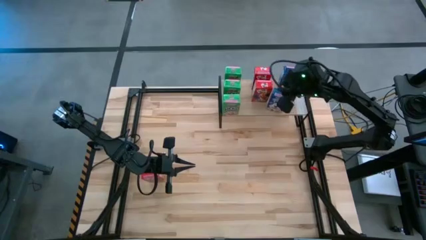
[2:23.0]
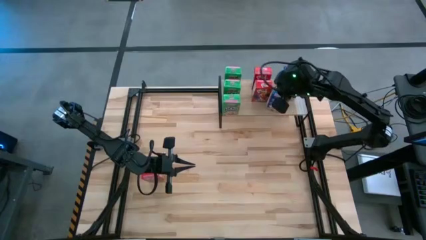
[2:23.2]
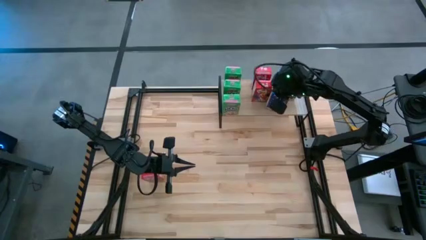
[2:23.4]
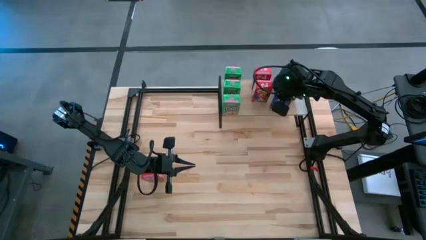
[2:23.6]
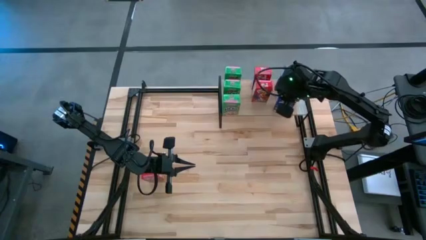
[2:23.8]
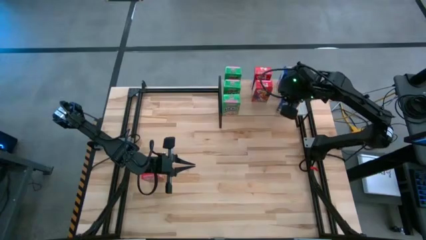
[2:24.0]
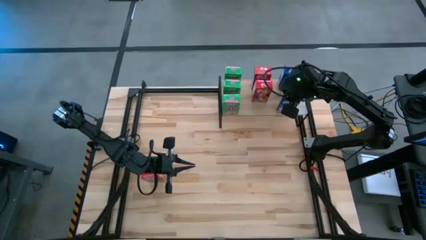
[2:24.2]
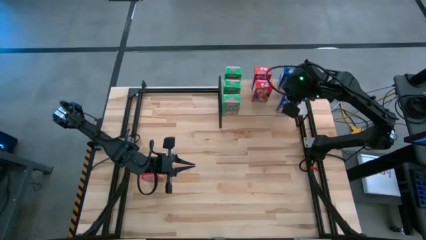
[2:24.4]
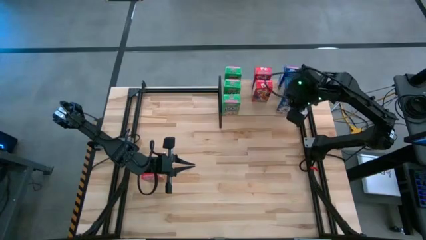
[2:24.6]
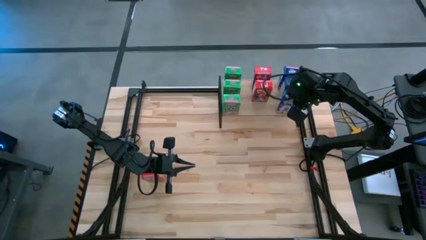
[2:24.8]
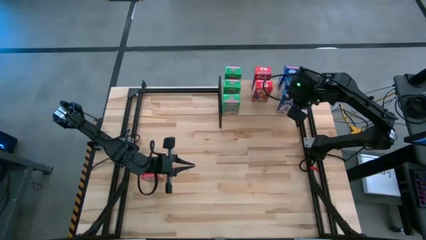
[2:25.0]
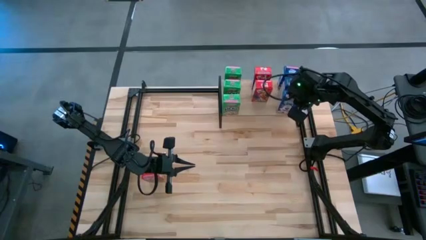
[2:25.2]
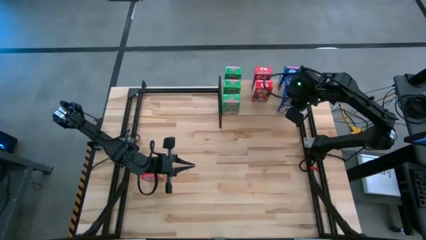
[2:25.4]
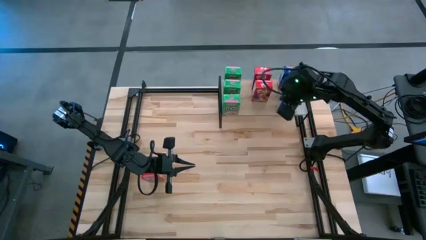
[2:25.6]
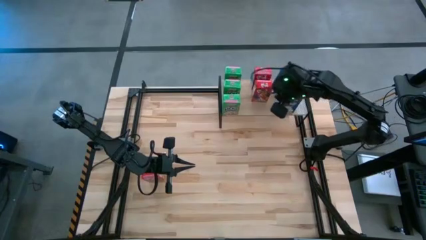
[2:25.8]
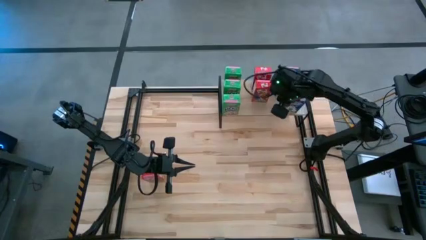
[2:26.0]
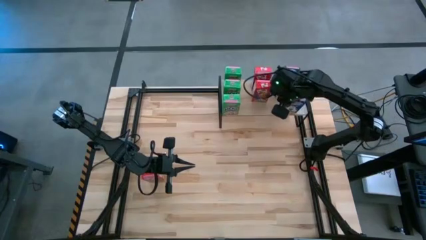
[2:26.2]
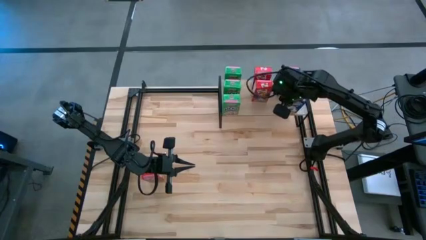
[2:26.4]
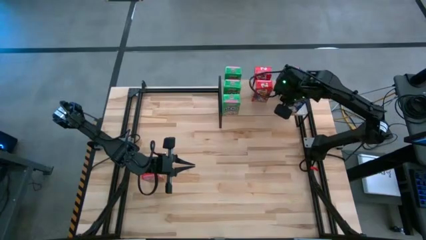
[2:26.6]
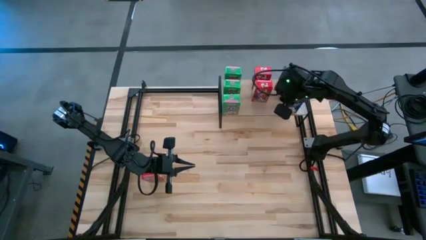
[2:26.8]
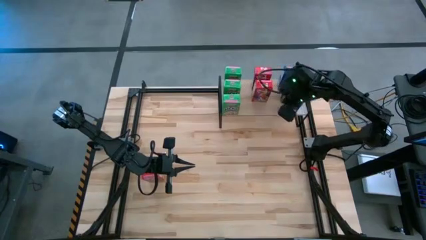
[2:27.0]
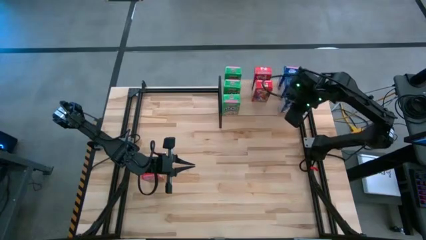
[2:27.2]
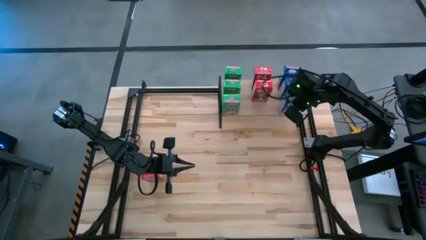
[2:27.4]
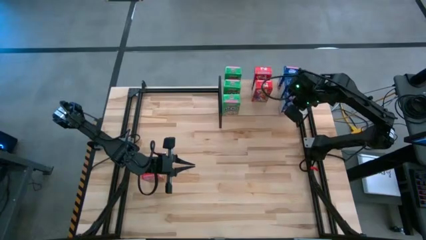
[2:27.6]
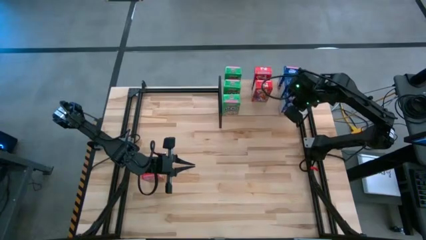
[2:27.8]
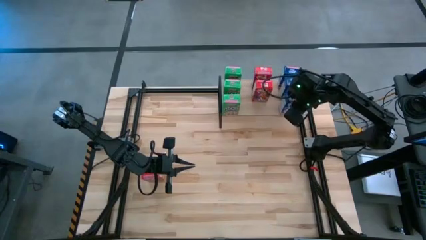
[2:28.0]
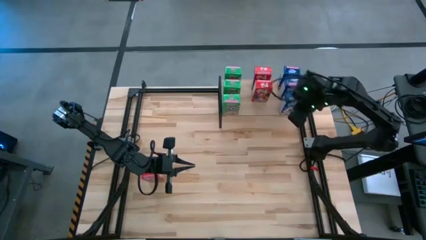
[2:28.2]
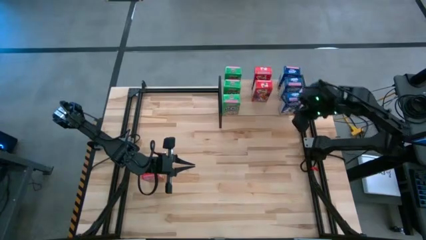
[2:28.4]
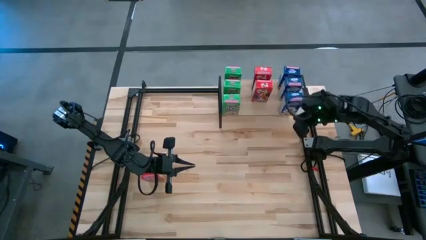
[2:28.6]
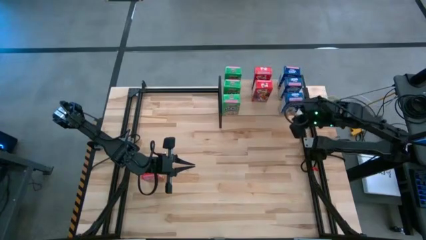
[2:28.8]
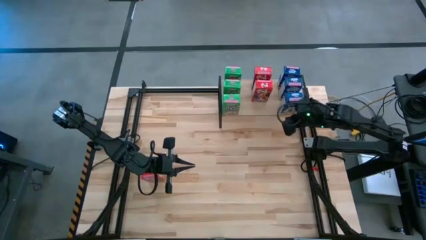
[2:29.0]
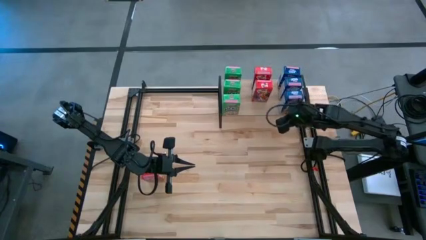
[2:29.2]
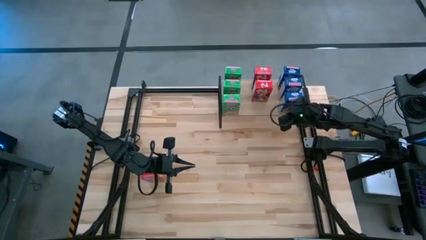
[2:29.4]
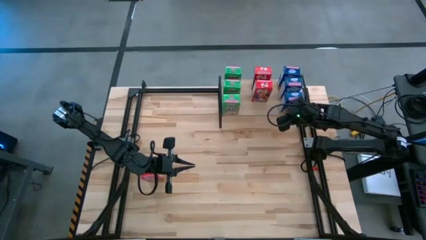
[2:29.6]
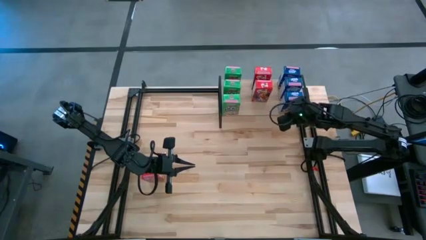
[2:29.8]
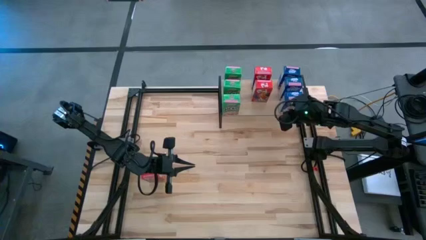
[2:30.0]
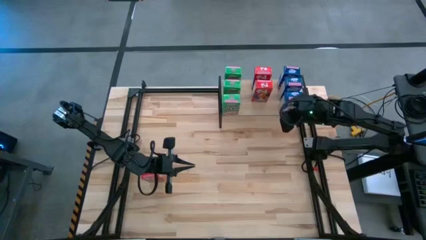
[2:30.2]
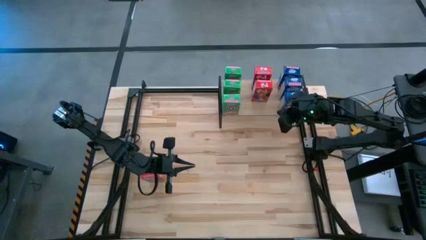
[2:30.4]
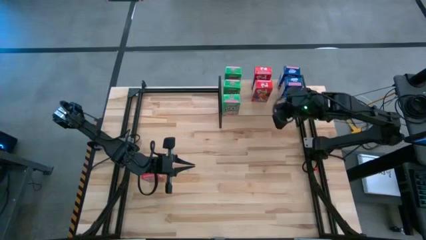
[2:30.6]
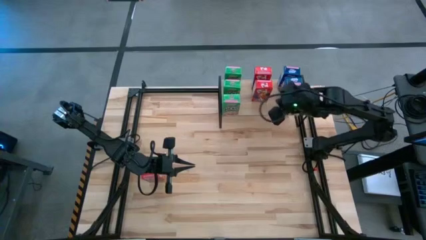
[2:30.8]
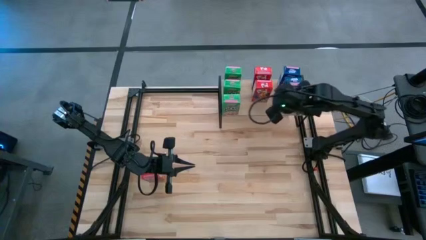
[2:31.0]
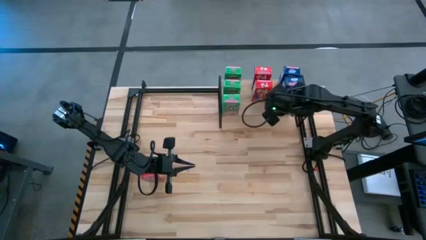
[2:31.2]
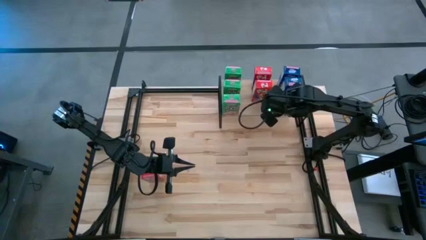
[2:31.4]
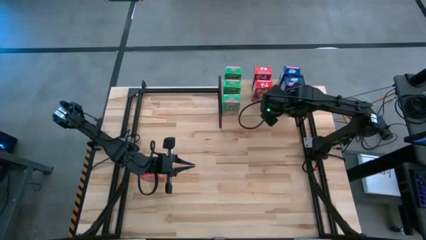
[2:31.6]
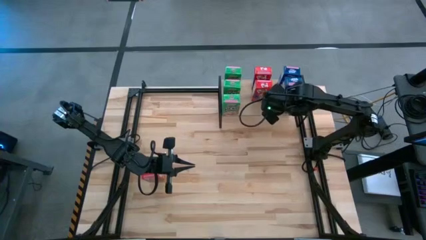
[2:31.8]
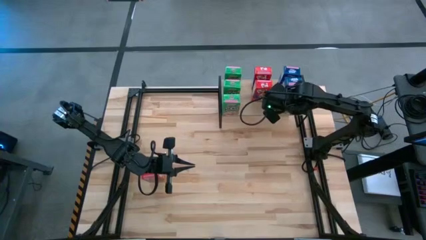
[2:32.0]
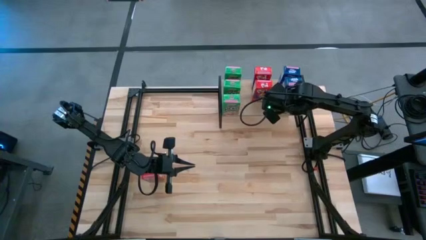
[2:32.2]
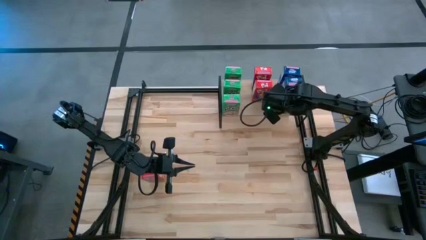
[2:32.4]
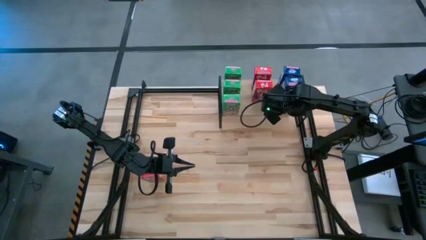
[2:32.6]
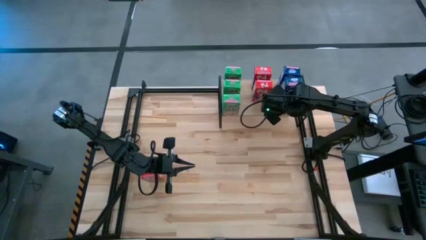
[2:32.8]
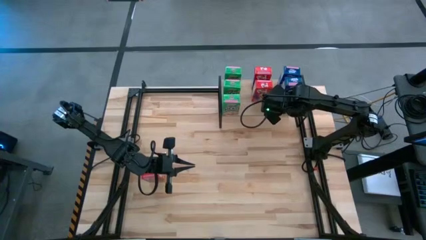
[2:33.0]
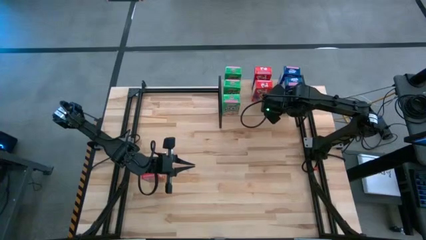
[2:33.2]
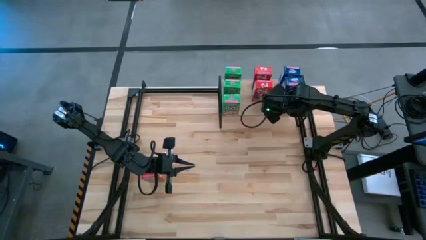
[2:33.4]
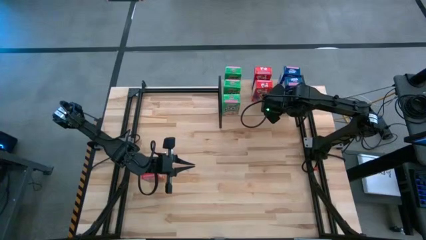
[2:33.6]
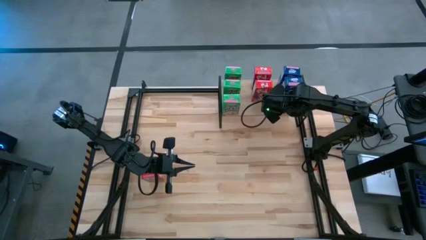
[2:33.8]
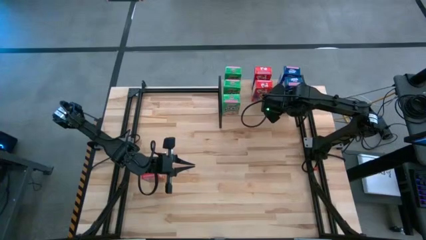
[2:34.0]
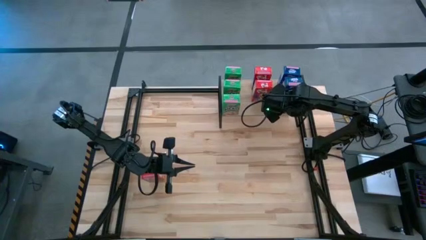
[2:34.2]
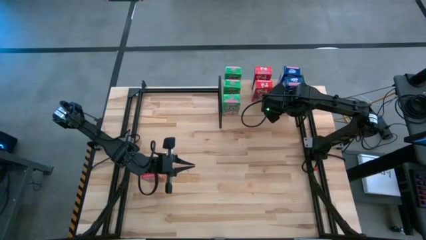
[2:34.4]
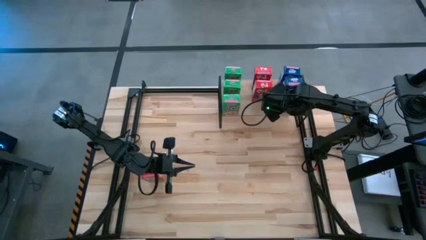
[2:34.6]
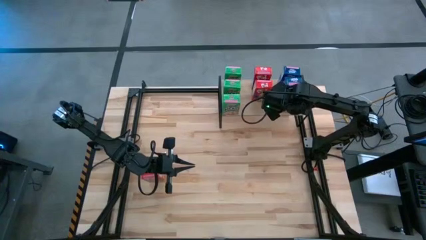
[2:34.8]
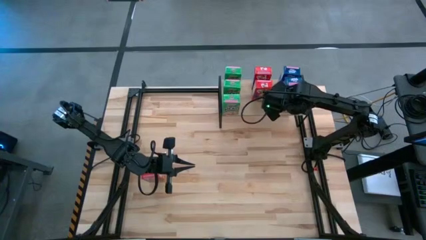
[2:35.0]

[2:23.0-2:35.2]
Task: Stack cereal on shelf
Put the blue cereal box on the shelf aligned with other blue cereal boxes

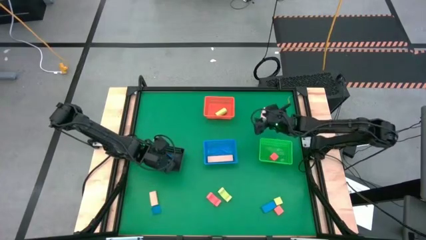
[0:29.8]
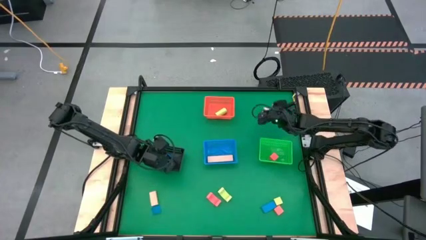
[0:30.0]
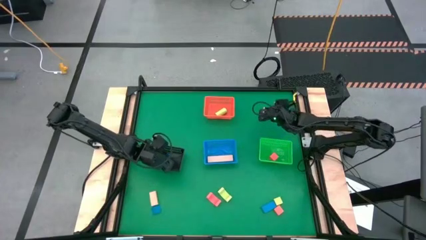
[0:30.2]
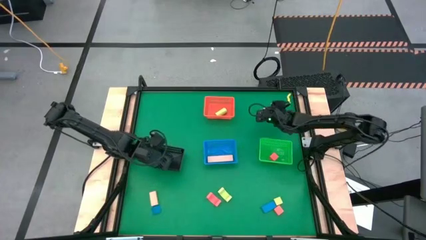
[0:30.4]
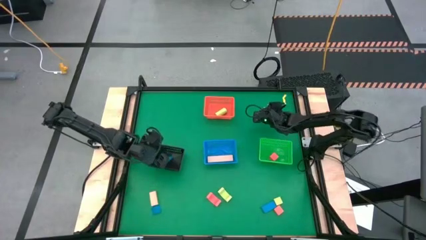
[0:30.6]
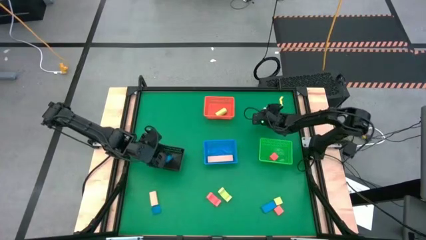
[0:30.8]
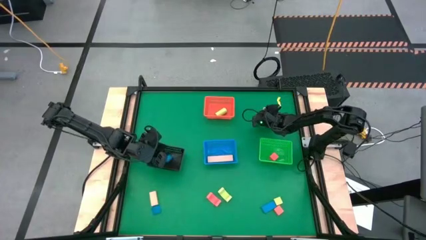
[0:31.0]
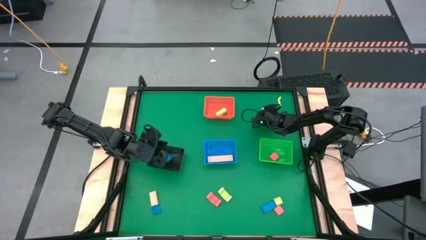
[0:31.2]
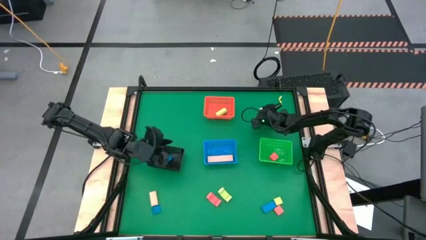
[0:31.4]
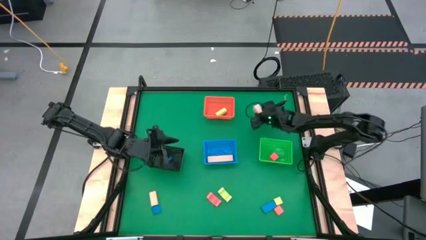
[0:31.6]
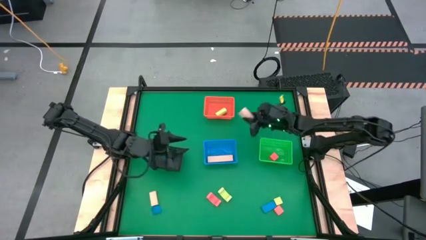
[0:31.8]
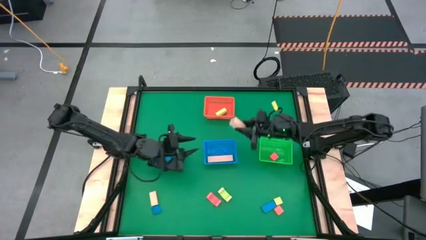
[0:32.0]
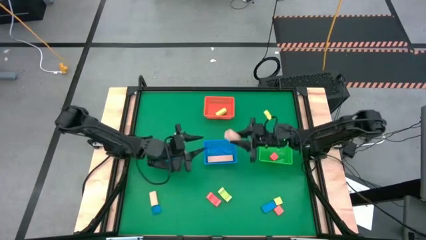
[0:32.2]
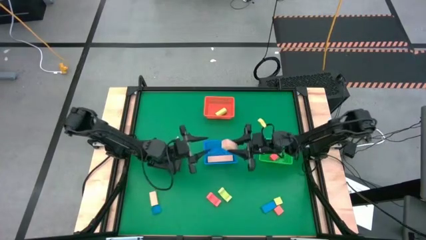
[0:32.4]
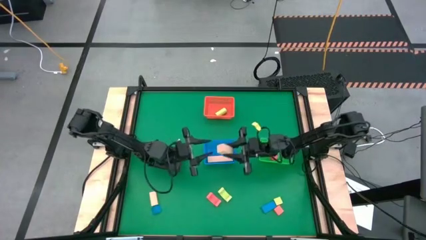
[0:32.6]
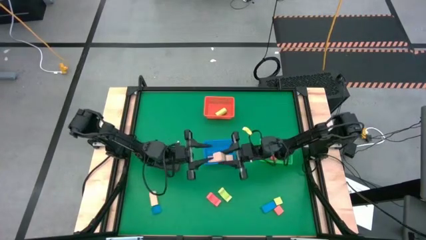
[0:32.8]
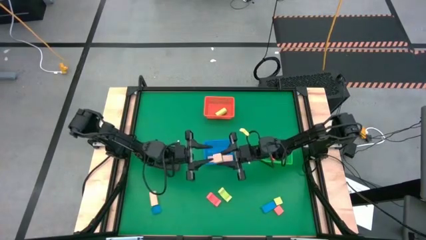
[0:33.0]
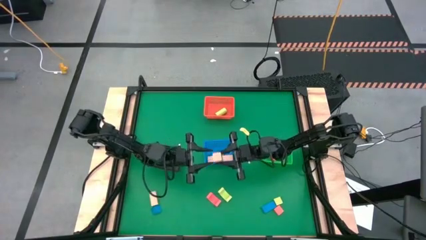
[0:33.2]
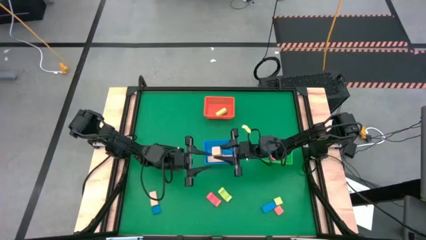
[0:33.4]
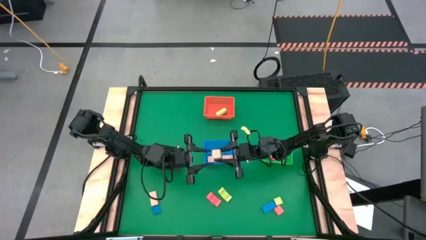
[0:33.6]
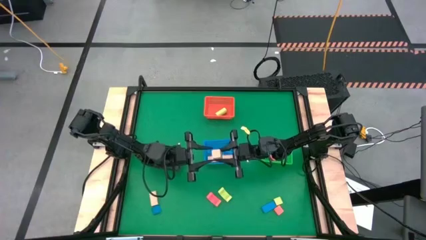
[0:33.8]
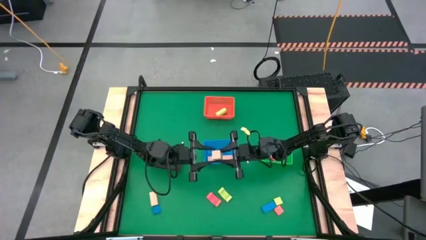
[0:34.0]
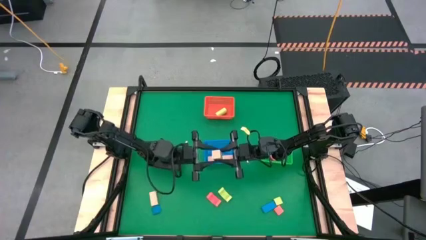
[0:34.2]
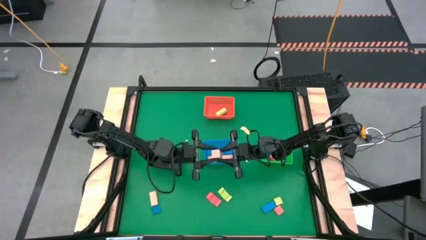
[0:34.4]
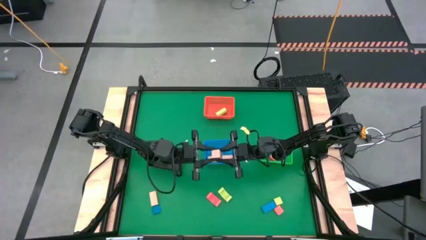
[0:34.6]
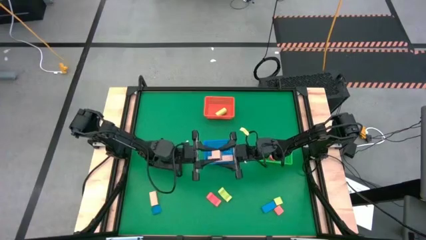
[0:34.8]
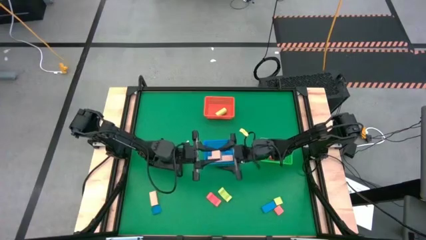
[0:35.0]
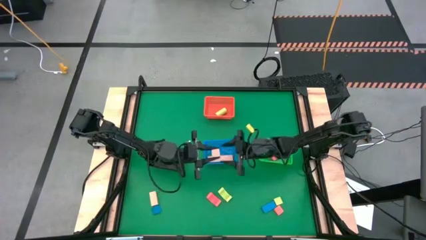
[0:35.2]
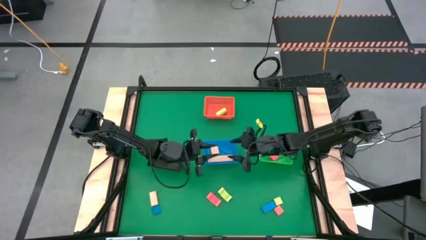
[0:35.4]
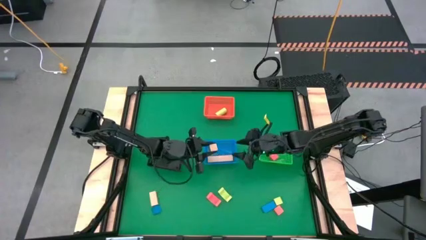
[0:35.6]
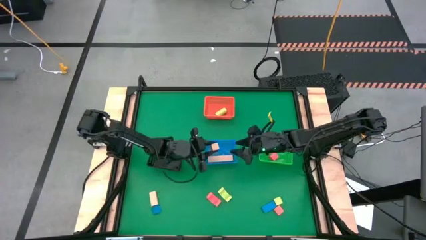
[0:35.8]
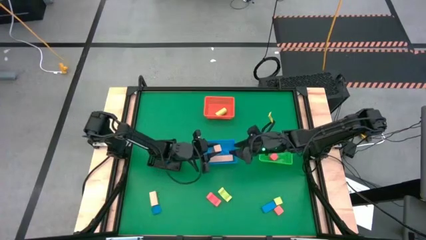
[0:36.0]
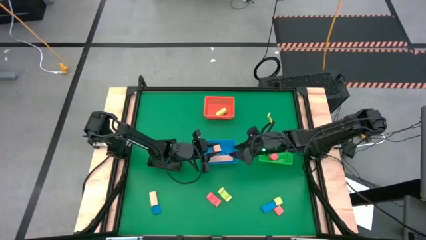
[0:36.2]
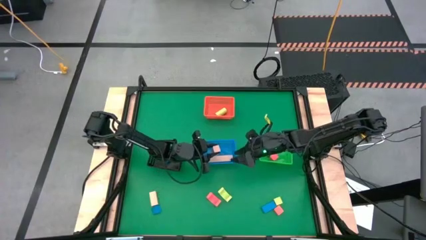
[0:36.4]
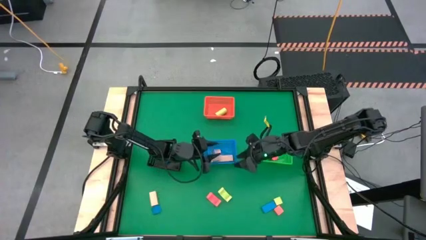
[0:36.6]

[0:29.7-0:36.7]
Task: Sort & place blocks by color
Put the top brown block into the blue bin
